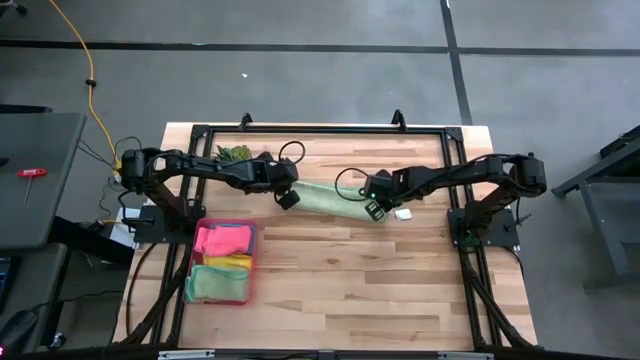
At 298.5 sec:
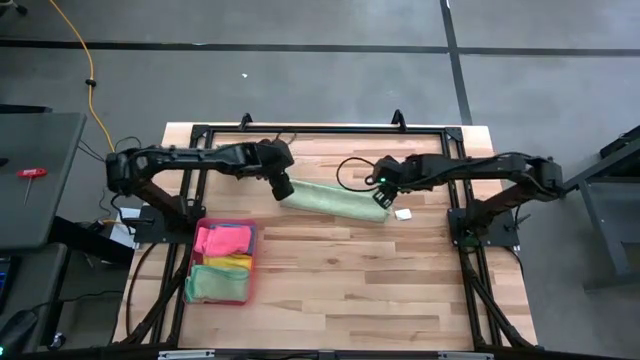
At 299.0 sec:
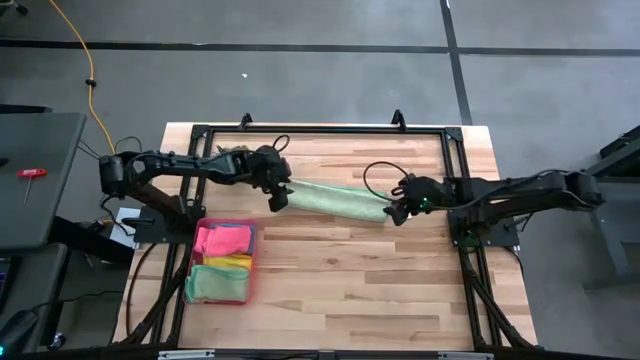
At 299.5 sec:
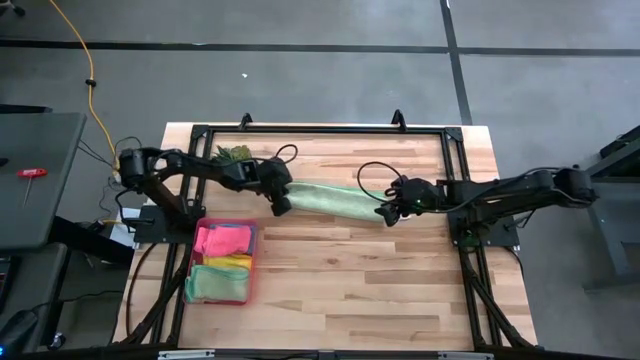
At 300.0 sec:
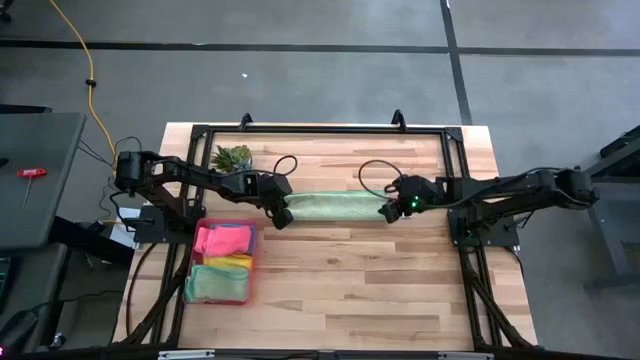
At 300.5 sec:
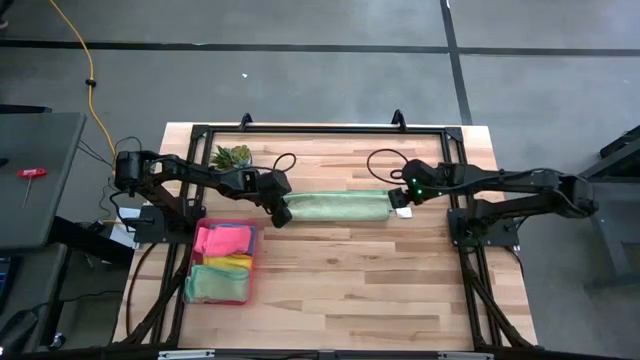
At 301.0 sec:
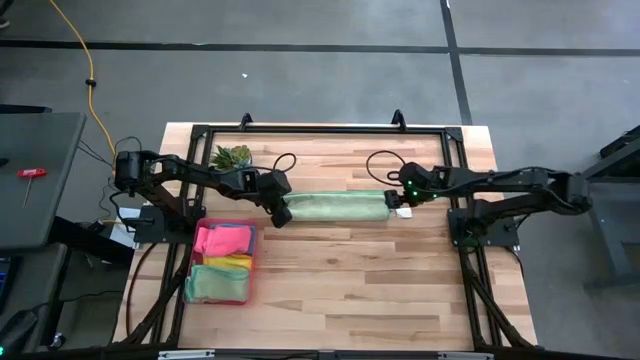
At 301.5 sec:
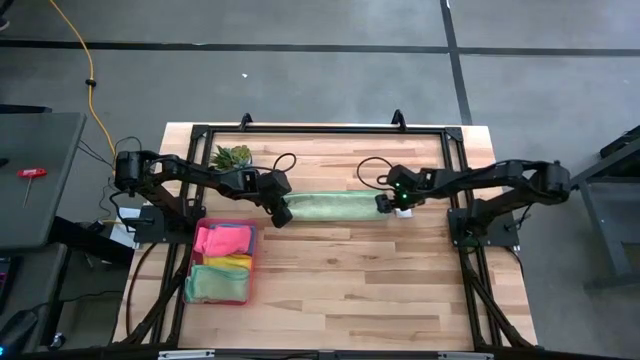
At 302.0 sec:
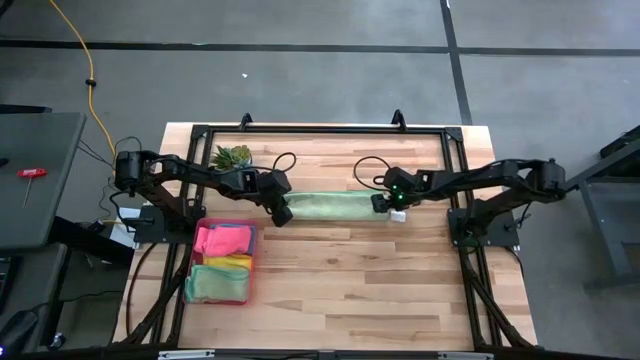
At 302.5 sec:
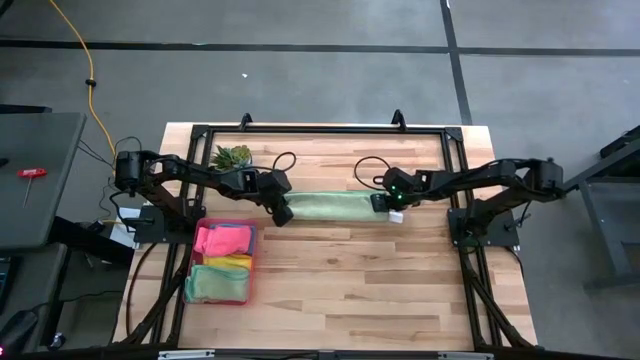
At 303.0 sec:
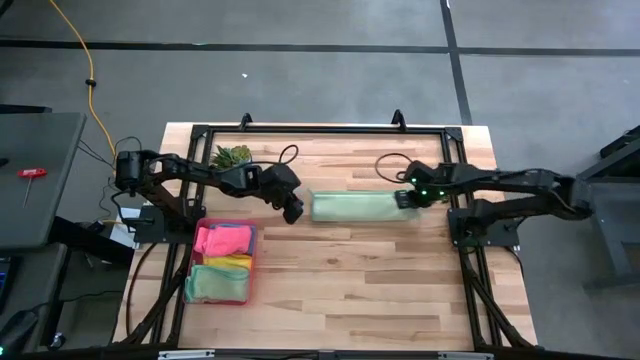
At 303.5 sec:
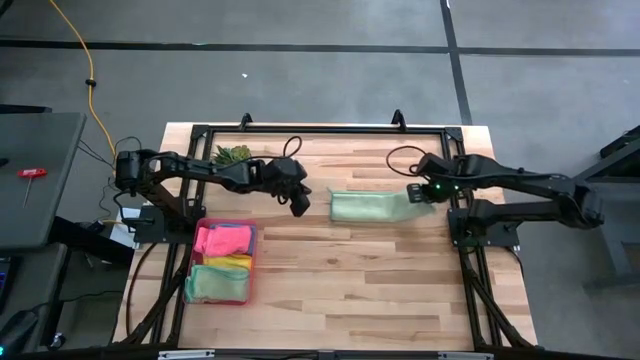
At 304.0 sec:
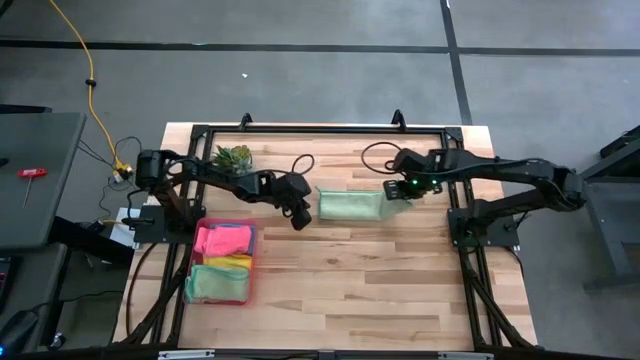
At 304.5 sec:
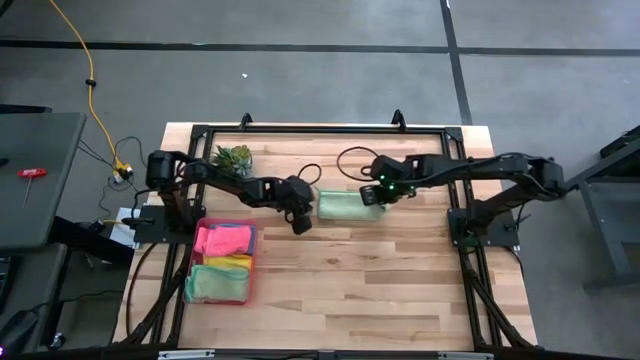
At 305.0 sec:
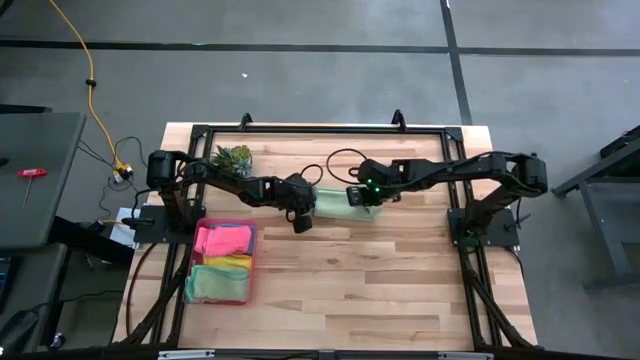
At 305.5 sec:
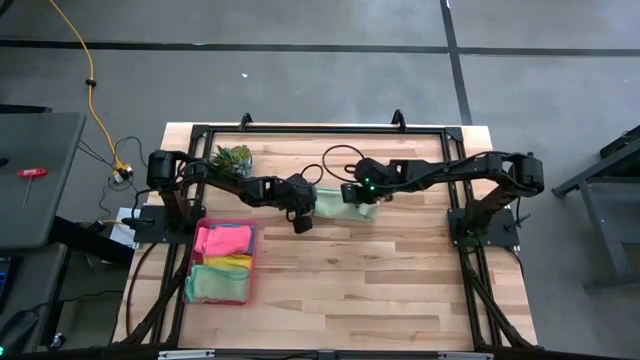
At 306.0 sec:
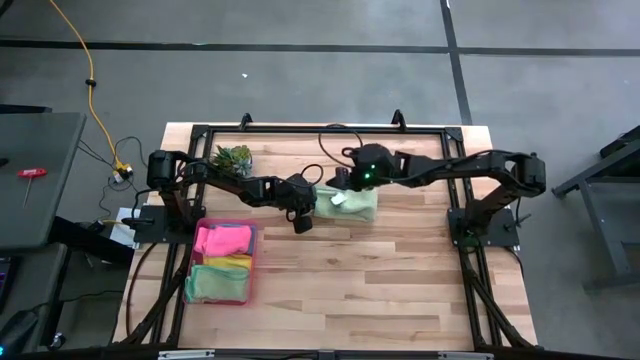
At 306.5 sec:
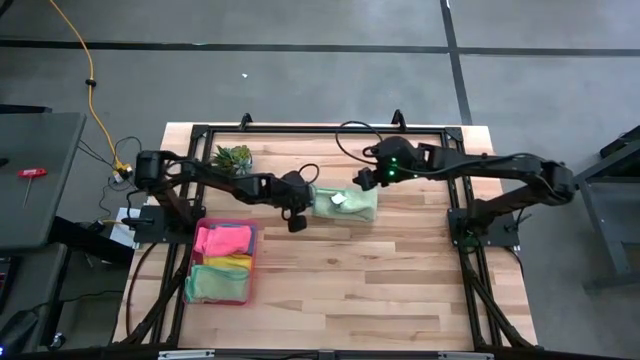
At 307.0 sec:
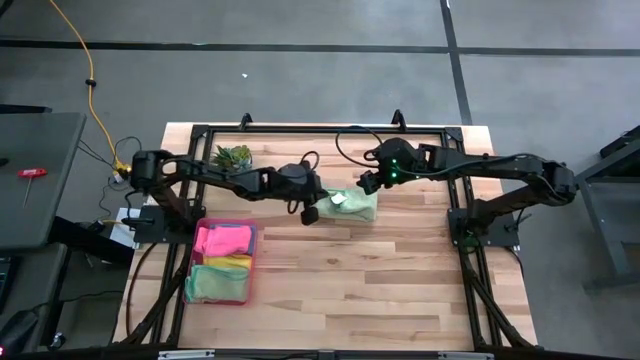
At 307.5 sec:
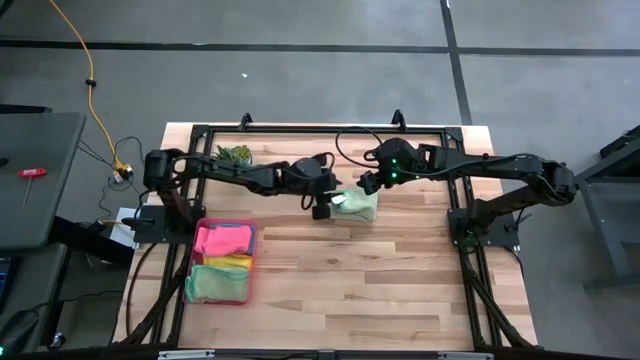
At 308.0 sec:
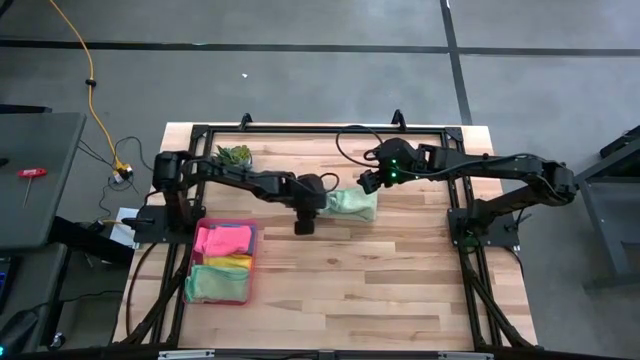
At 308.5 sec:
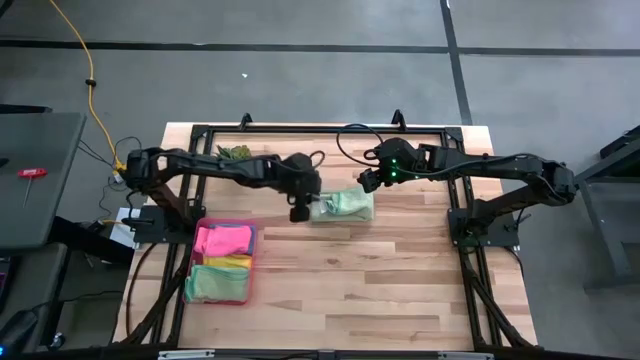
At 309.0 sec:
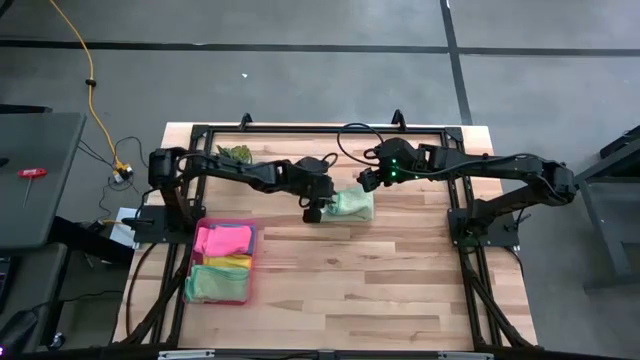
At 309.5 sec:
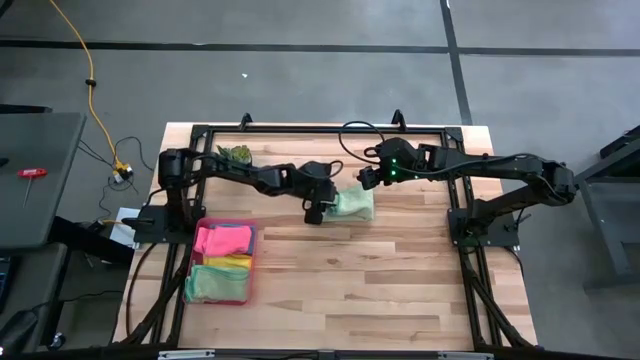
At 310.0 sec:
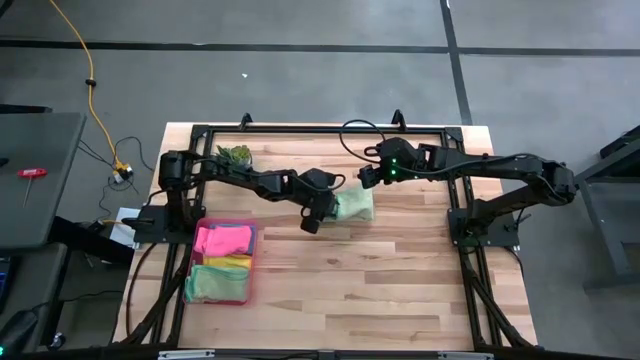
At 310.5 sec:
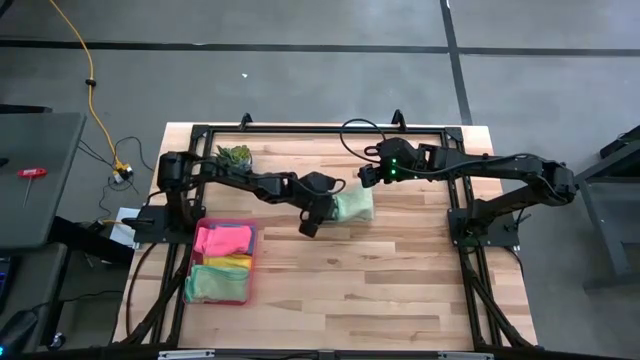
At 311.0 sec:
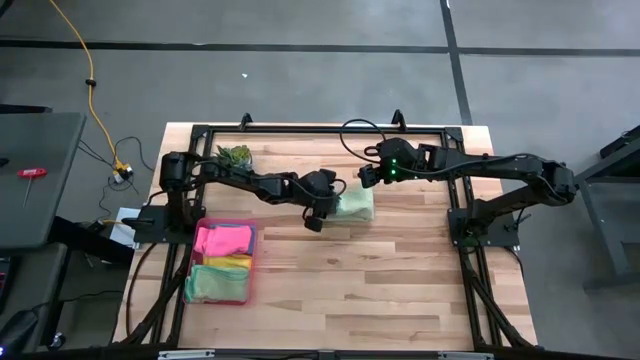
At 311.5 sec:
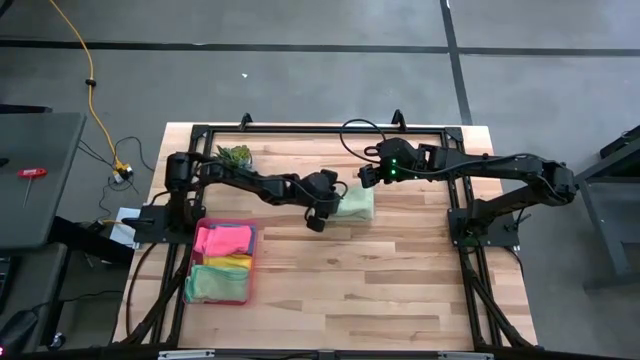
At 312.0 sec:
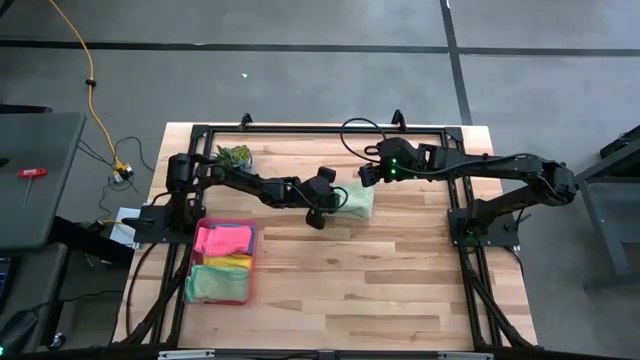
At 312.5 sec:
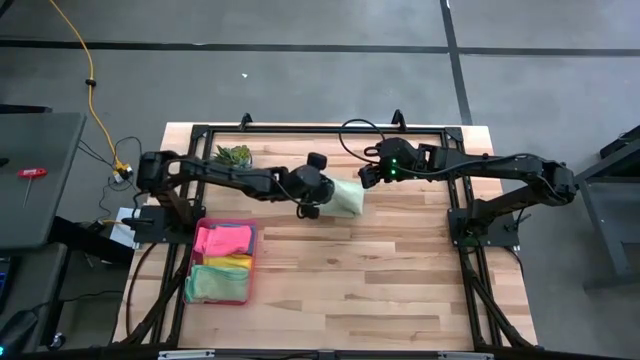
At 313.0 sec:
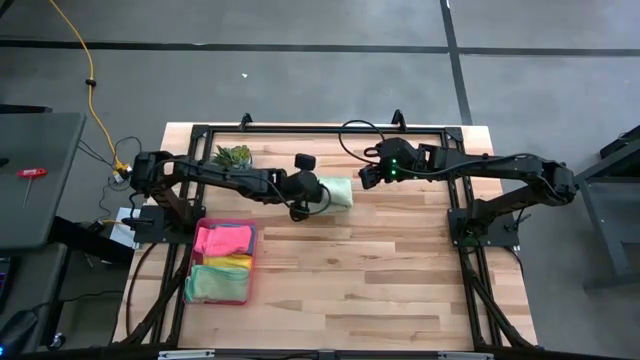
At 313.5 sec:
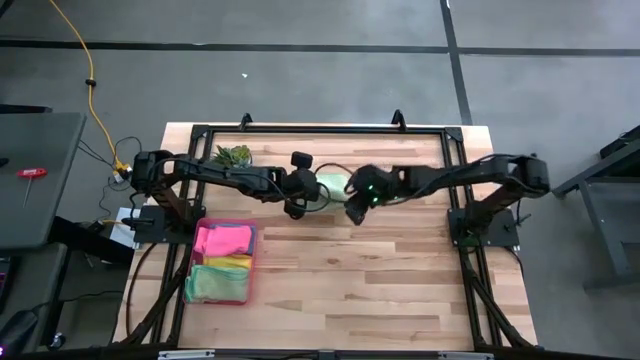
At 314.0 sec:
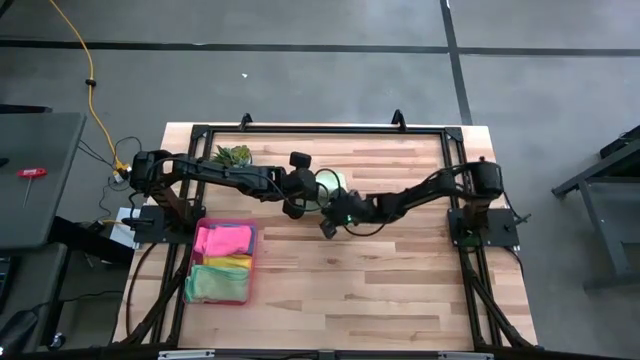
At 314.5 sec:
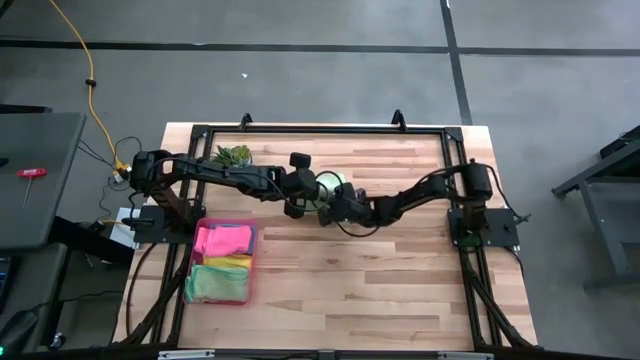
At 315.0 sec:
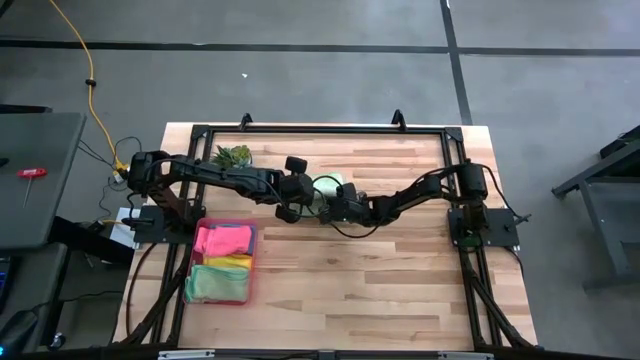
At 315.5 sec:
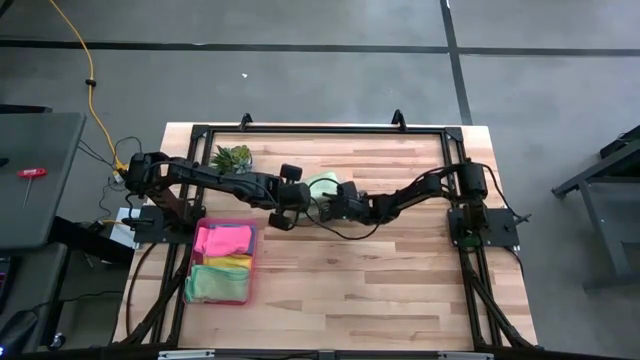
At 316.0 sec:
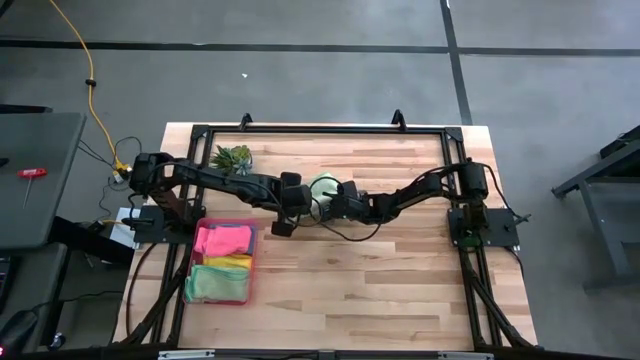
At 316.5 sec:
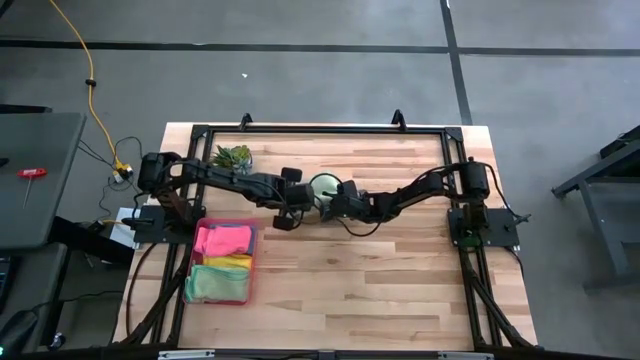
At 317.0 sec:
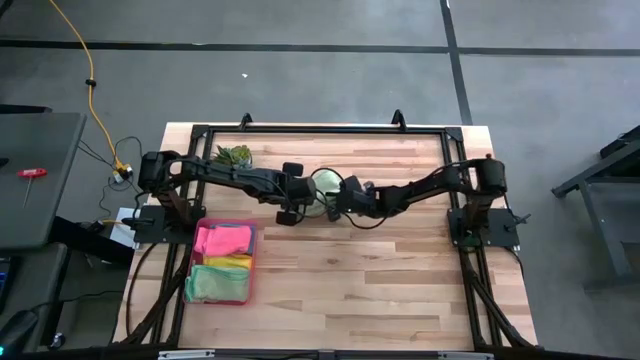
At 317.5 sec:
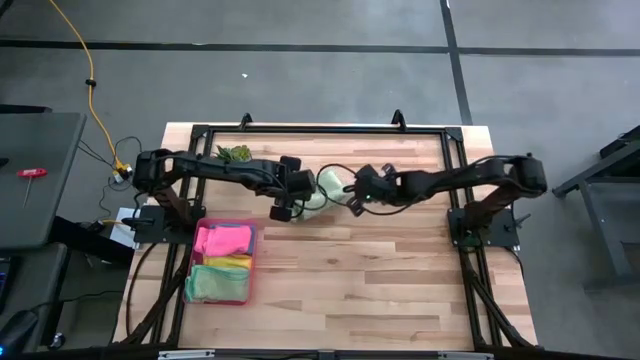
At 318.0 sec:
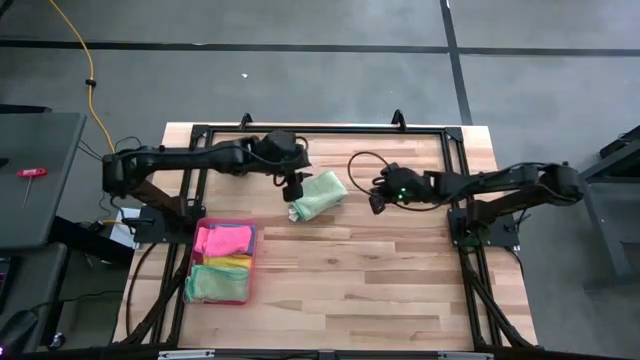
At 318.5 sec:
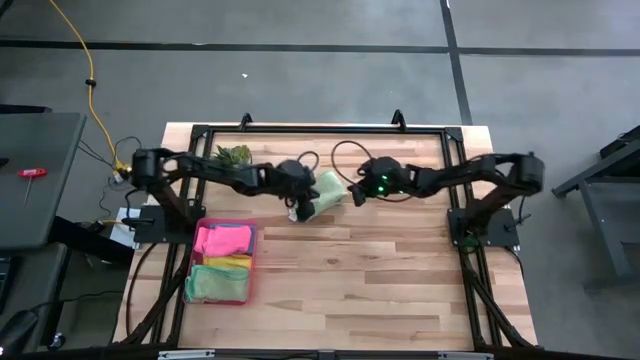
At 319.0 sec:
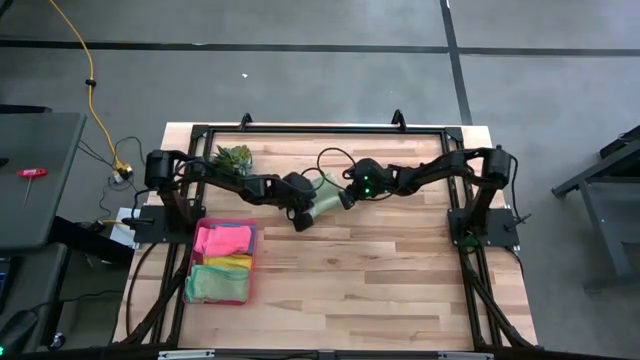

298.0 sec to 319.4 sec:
Task: Fold microfiber towels
Fold the green microfiber towel
